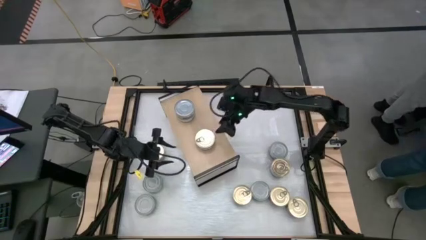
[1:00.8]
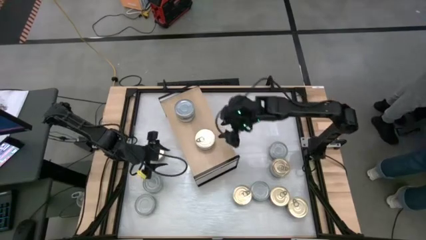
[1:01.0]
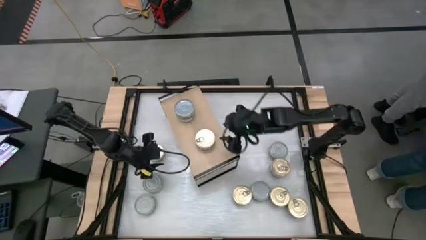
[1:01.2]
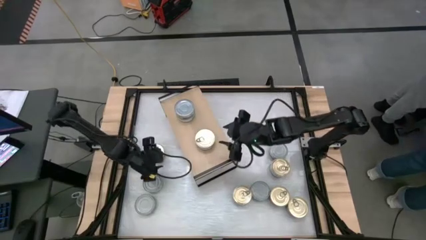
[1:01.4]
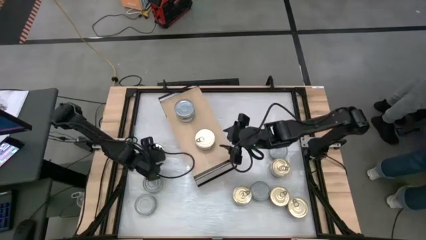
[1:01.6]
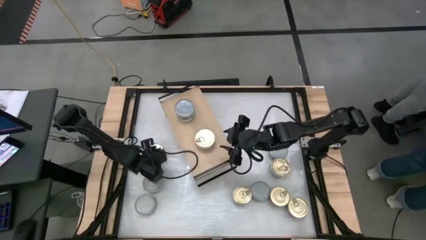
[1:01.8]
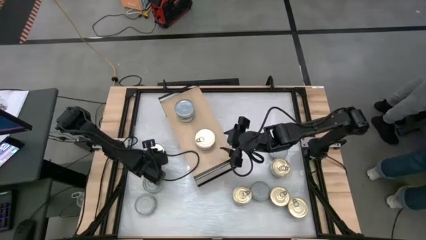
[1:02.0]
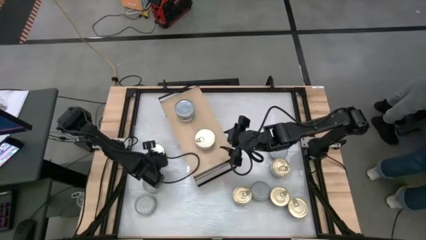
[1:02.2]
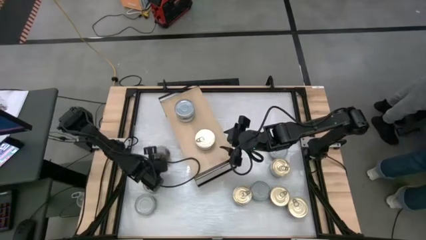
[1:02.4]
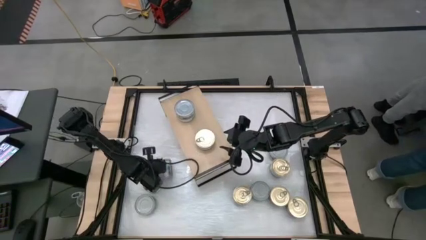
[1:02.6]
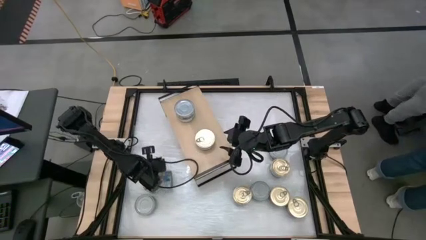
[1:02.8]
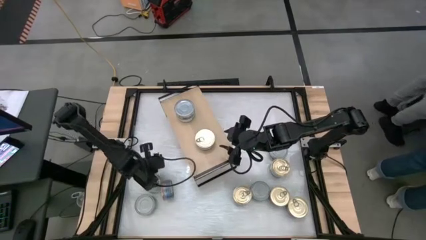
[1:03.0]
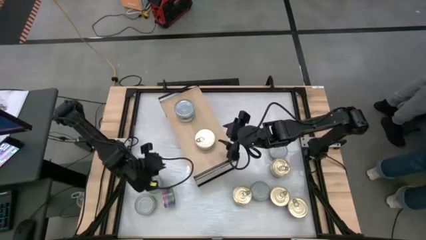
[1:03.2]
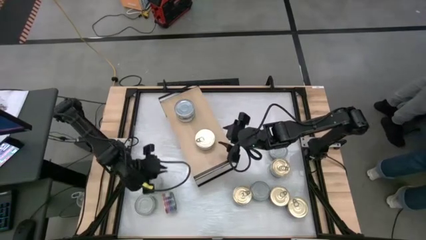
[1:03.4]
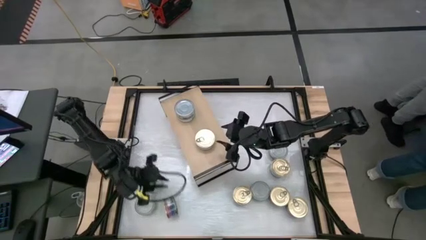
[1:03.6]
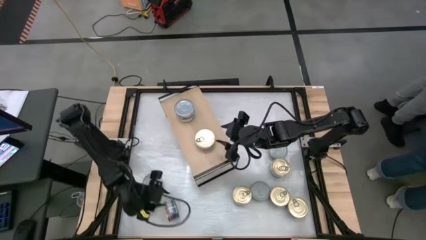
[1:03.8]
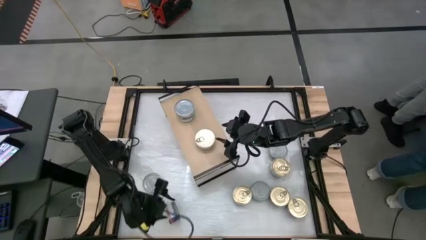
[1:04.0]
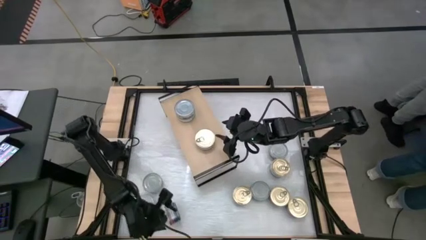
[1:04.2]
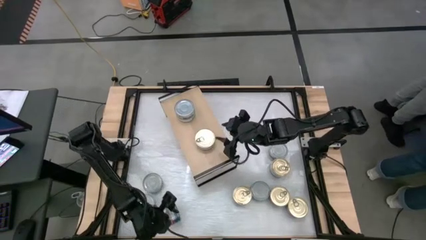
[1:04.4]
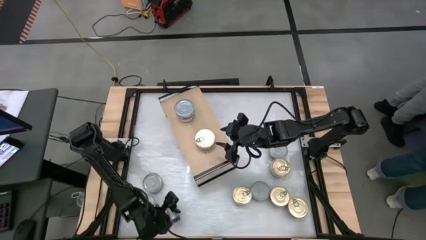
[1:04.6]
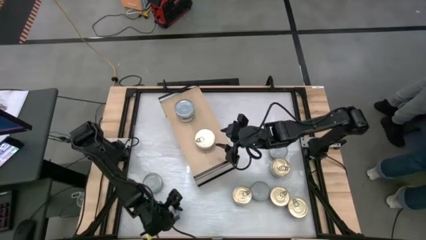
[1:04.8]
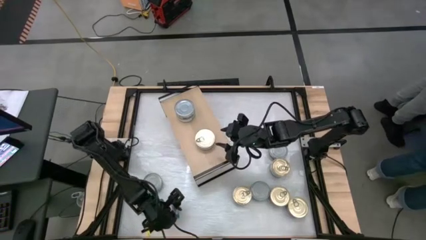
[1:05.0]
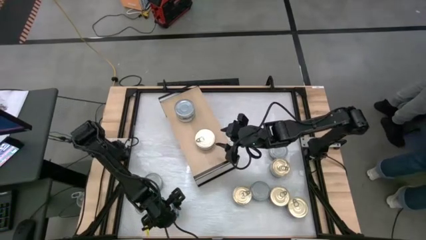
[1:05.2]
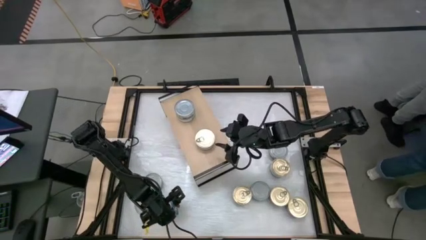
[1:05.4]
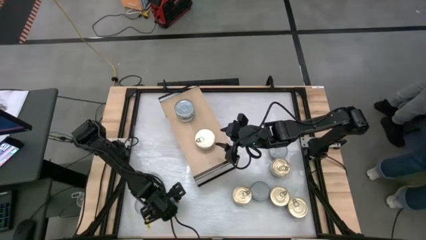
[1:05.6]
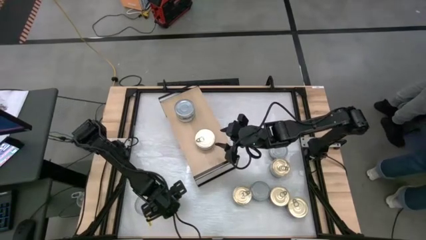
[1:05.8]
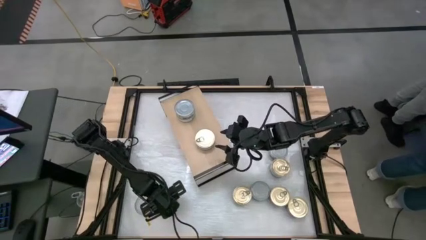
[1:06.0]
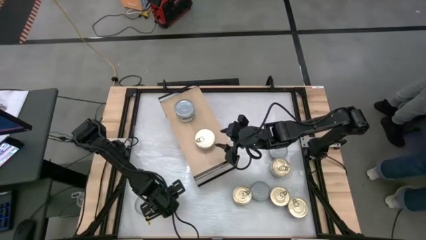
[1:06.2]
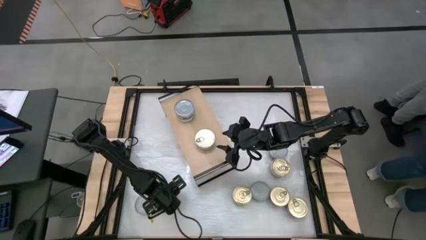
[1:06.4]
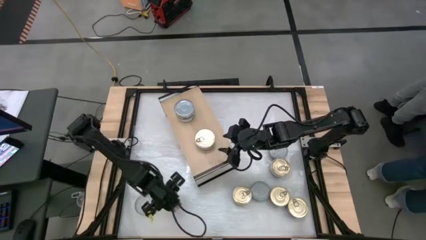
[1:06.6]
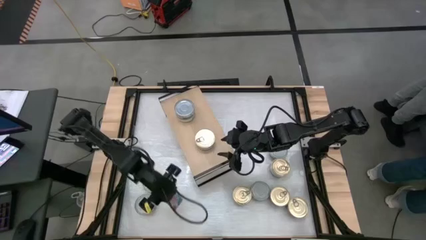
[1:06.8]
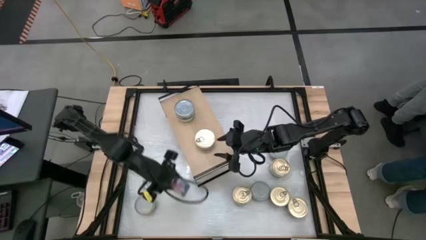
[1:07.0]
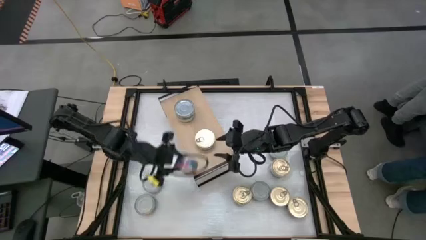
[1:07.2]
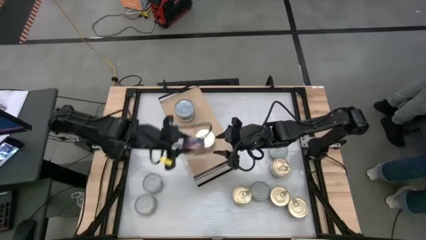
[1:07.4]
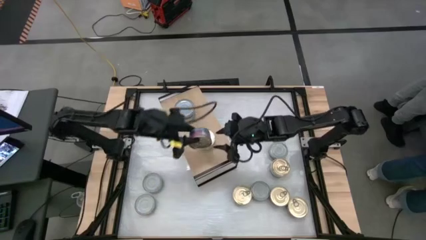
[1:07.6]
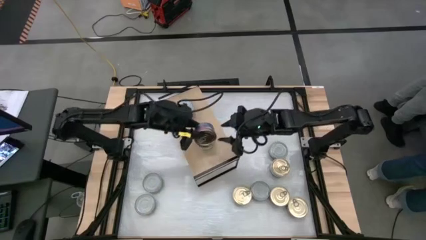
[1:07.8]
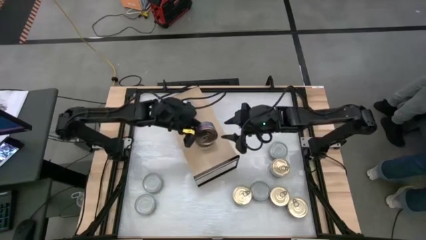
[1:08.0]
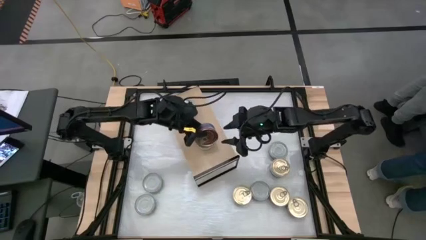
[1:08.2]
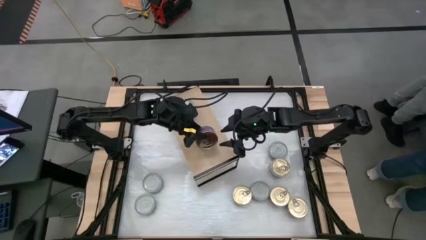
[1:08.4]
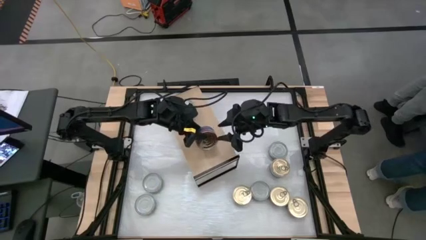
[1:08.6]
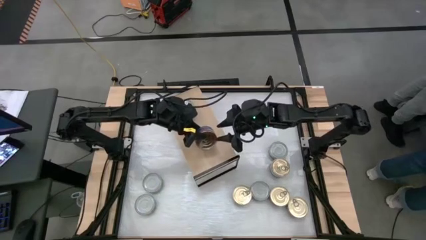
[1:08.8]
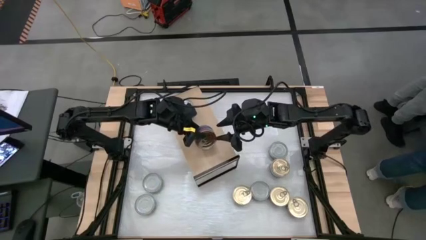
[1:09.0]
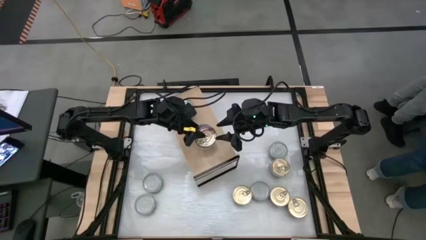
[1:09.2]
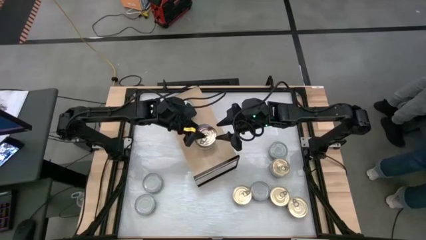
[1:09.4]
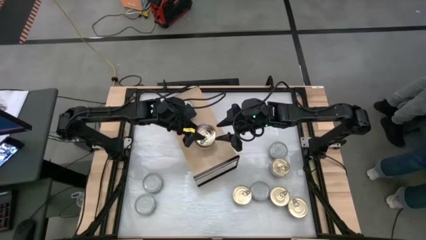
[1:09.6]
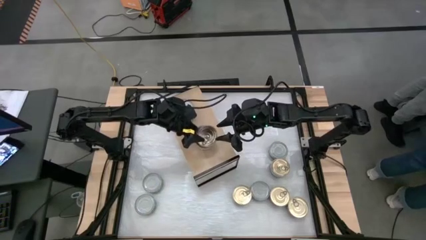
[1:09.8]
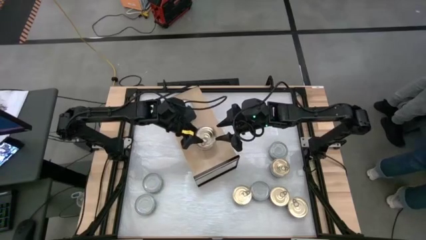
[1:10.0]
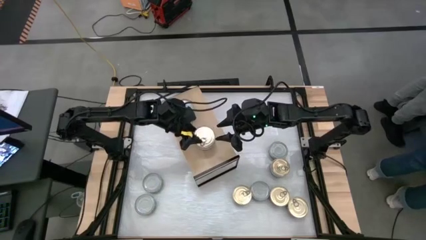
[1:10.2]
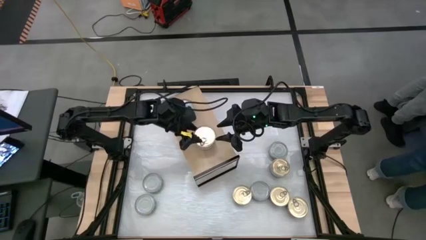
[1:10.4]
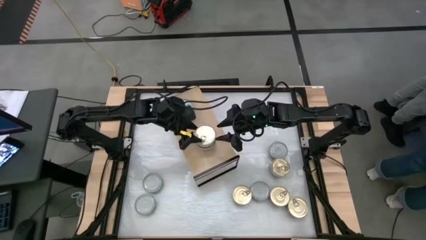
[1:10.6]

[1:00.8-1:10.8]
Task: Stack canned seafood by type on shelf
Stack the blue tuna can on top of the other blue tuna can on the shelf
